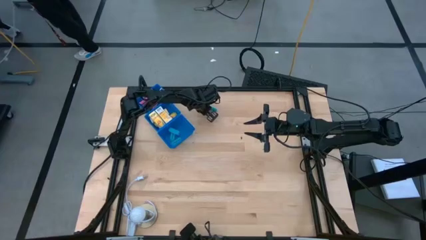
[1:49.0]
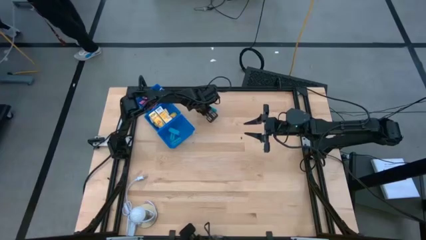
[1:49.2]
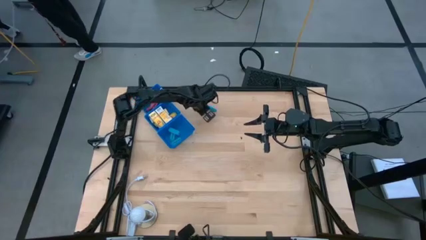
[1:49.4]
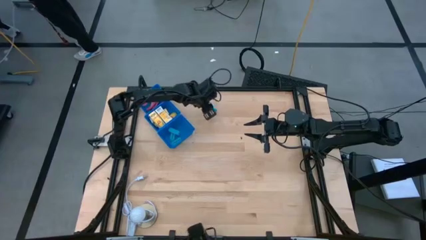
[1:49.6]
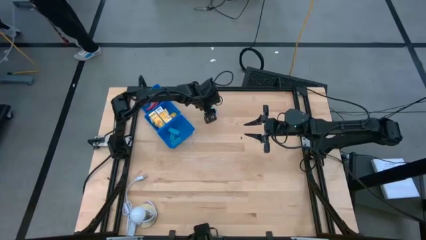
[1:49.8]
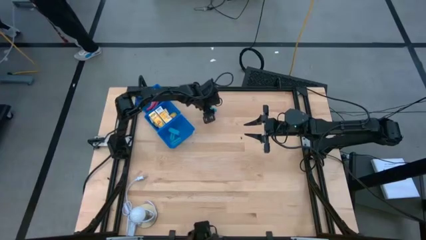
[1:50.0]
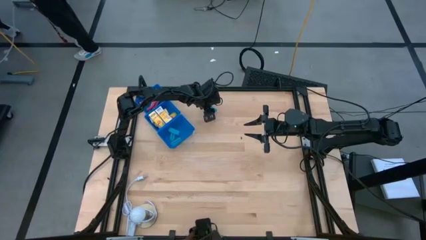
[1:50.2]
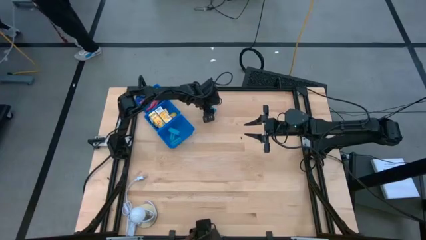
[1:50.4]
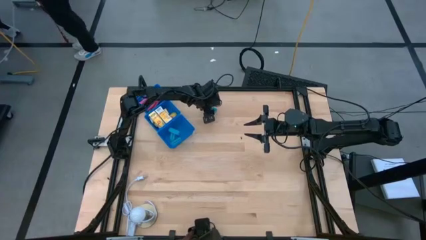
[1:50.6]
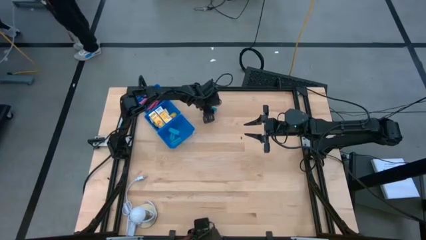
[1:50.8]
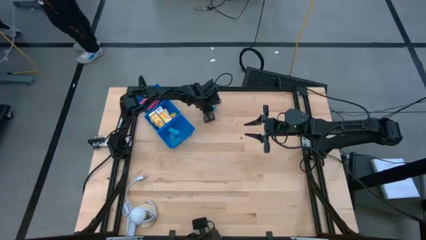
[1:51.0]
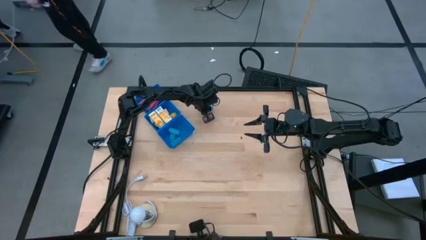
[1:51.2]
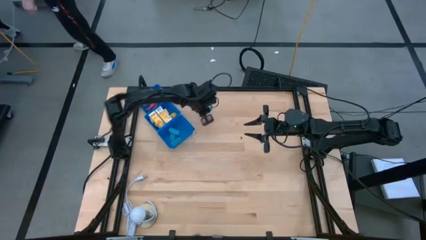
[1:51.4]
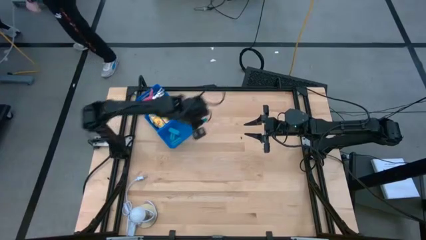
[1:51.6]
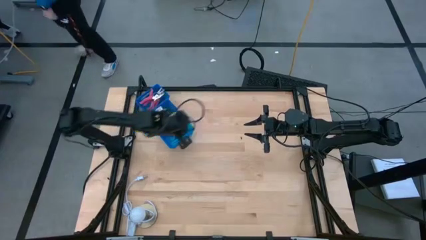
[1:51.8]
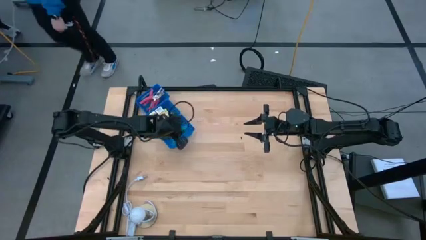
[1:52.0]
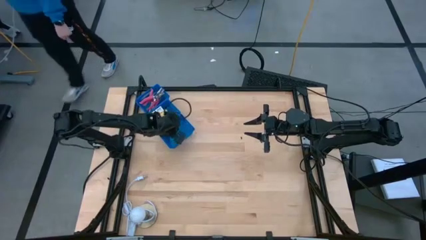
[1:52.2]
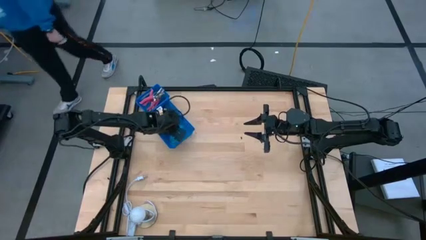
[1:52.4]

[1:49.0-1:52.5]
Task: Pick & Place School Supplies
Put the blue eraser into the bottom blue bin

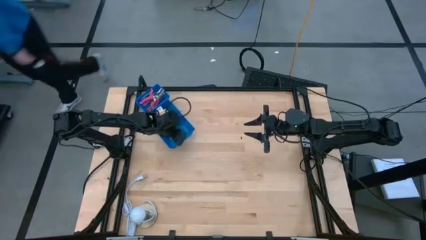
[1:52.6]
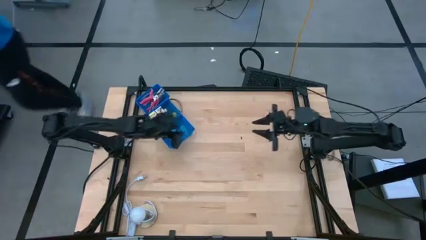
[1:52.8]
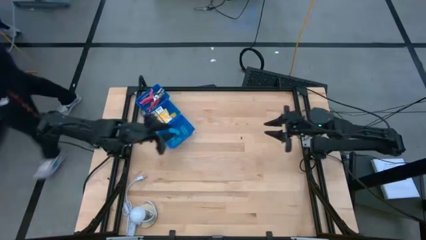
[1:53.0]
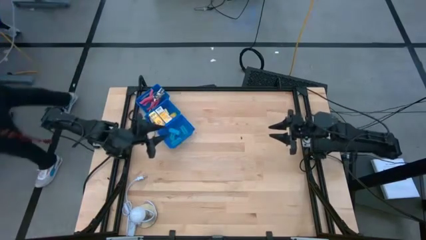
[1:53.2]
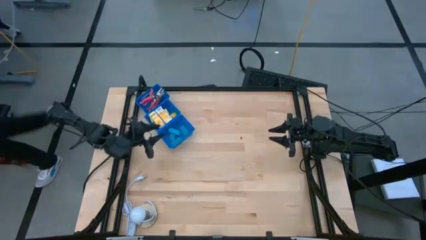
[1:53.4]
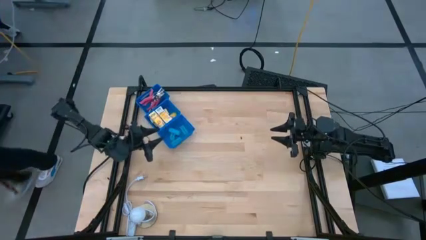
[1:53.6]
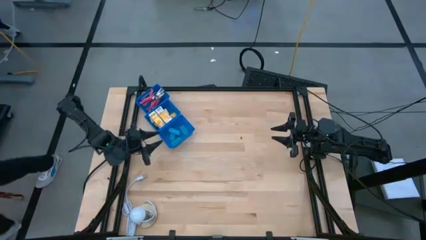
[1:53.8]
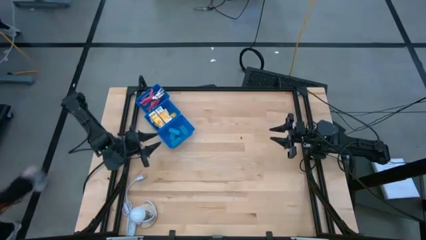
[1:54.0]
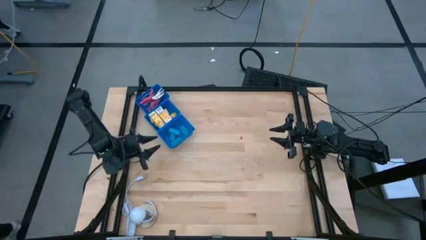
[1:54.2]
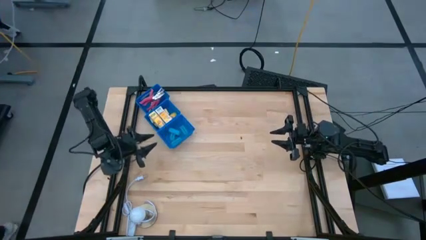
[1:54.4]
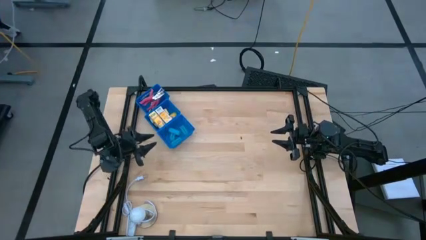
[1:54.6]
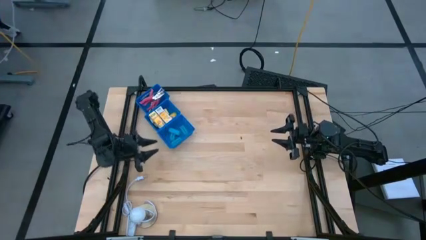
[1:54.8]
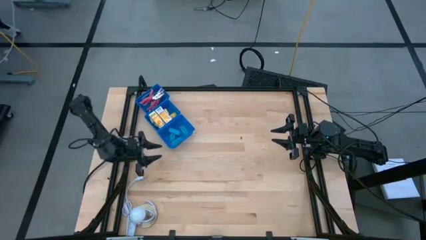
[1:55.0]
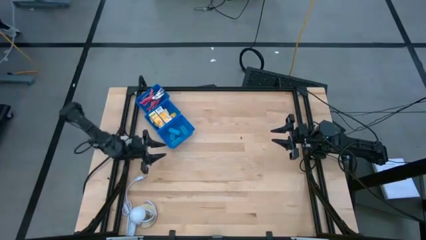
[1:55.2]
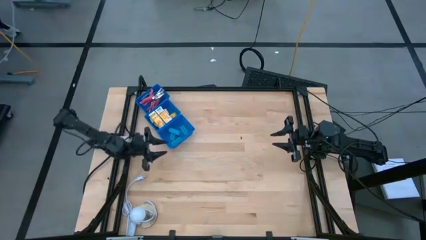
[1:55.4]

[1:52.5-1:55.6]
Return to Home Position

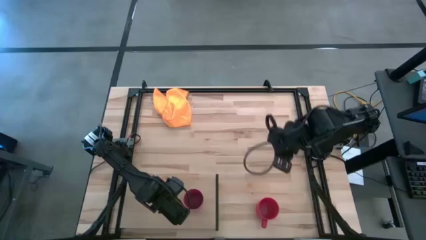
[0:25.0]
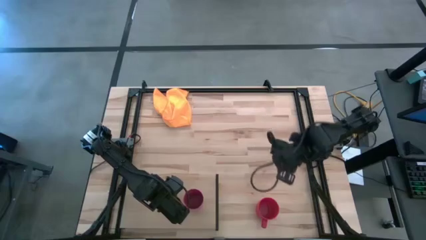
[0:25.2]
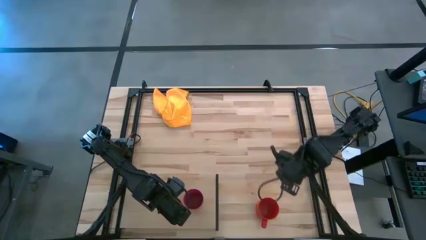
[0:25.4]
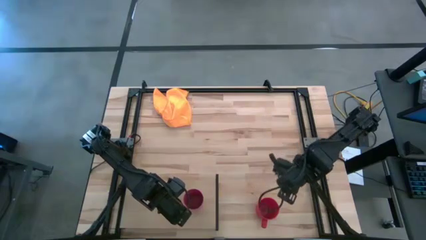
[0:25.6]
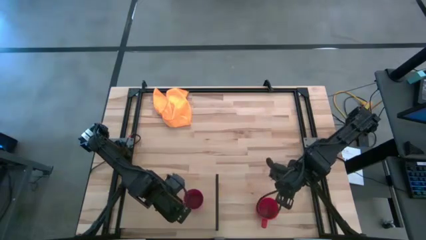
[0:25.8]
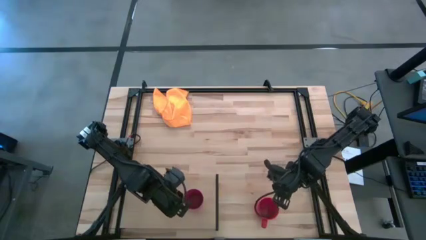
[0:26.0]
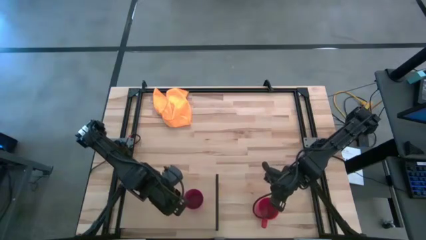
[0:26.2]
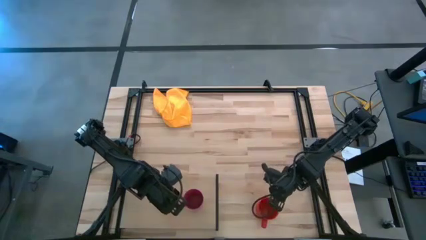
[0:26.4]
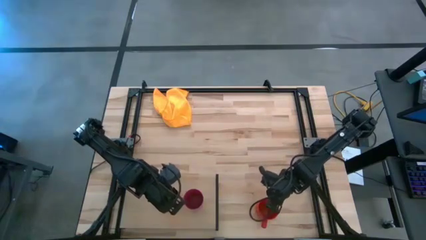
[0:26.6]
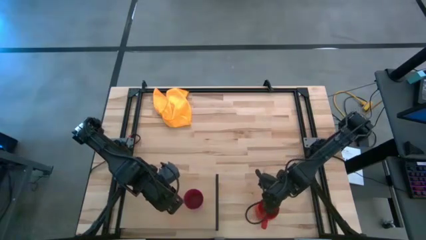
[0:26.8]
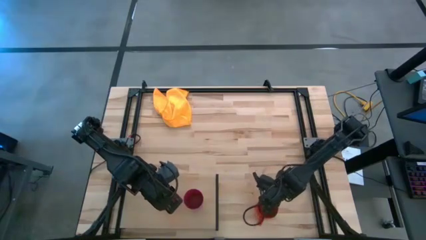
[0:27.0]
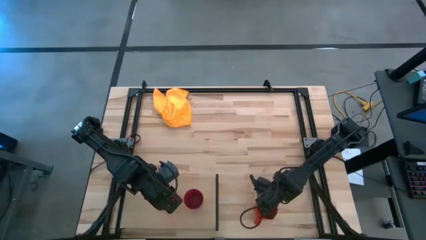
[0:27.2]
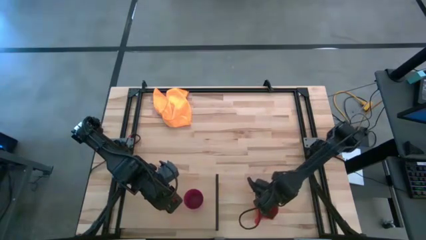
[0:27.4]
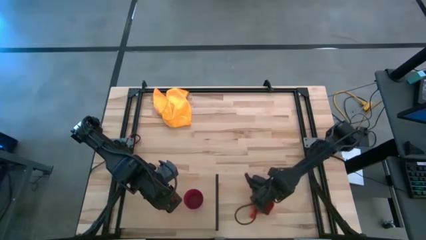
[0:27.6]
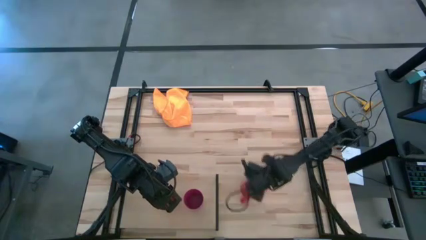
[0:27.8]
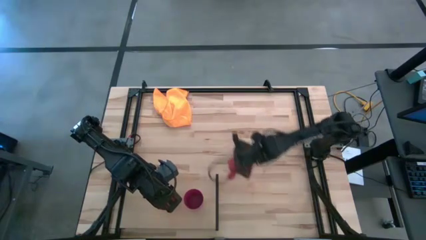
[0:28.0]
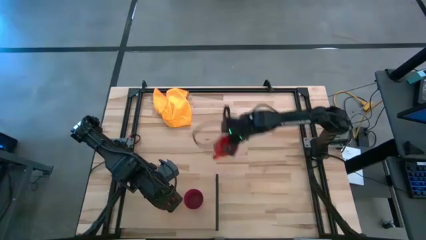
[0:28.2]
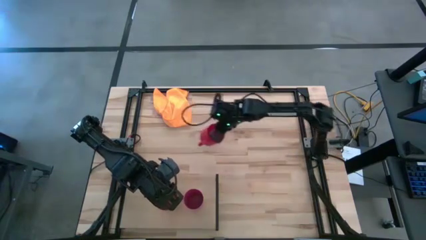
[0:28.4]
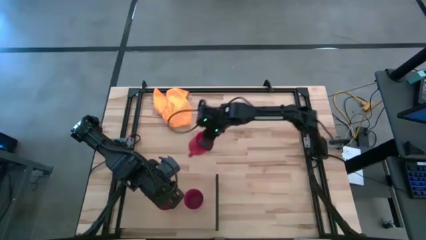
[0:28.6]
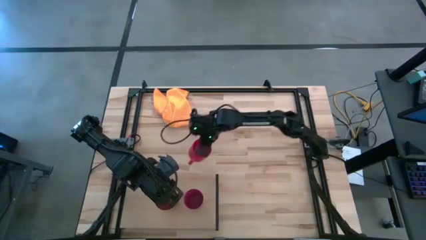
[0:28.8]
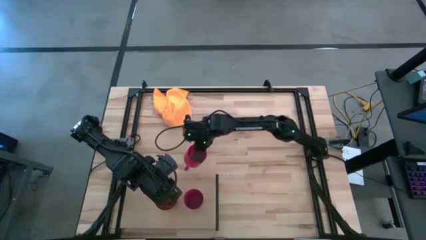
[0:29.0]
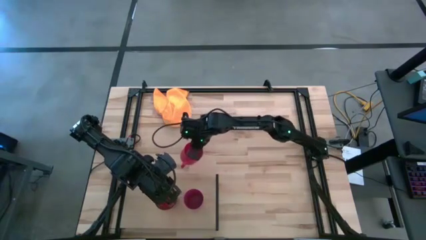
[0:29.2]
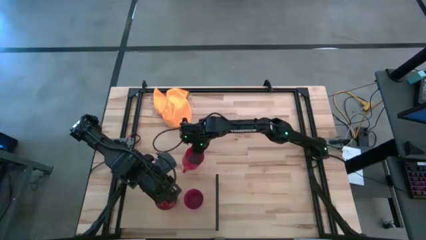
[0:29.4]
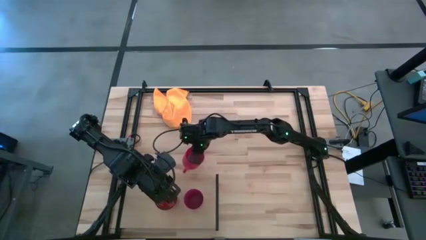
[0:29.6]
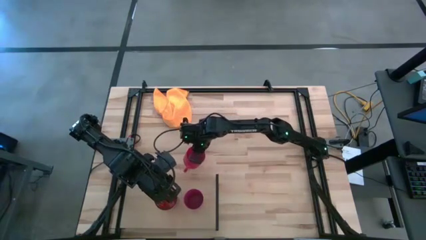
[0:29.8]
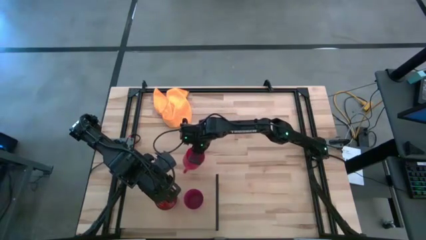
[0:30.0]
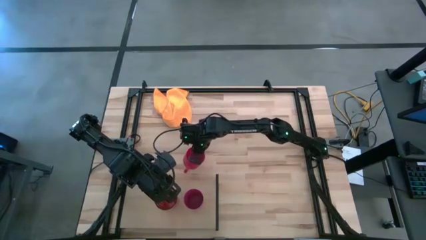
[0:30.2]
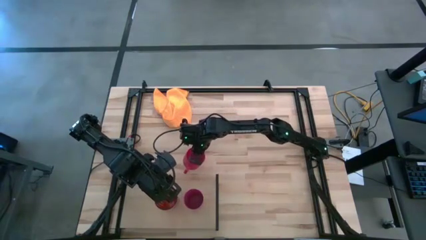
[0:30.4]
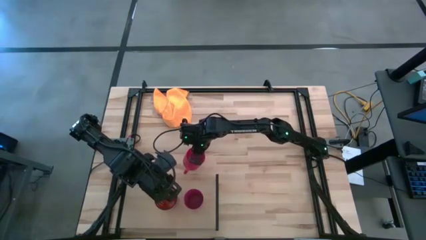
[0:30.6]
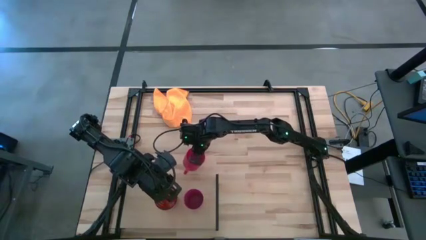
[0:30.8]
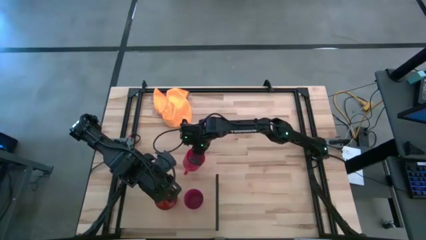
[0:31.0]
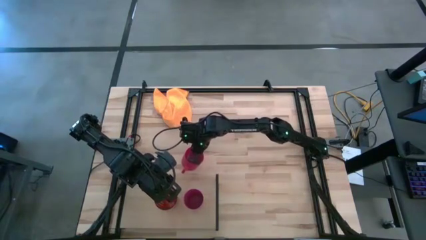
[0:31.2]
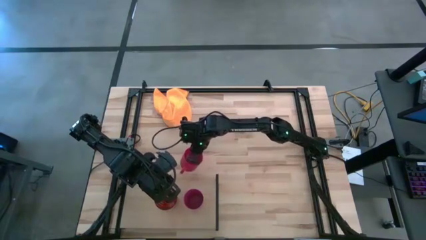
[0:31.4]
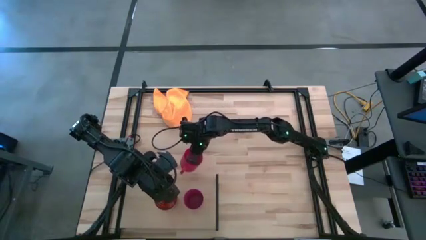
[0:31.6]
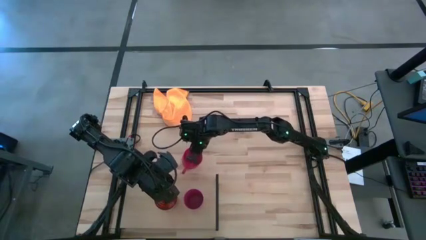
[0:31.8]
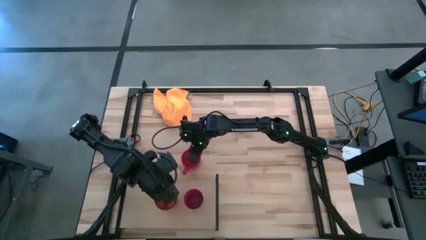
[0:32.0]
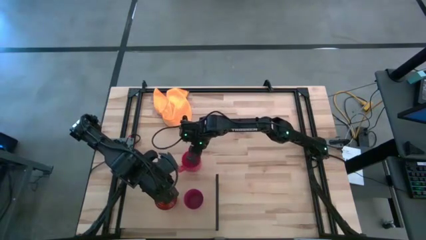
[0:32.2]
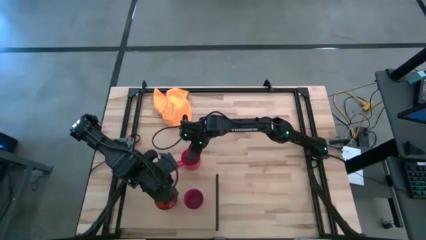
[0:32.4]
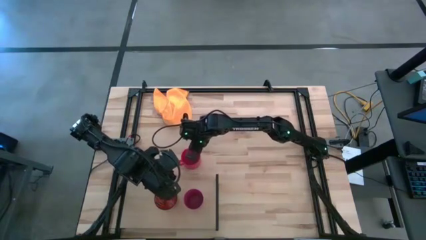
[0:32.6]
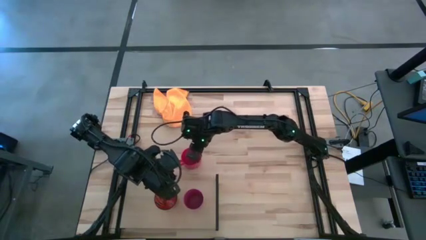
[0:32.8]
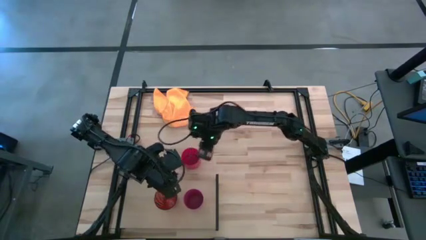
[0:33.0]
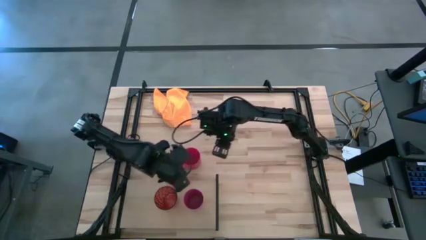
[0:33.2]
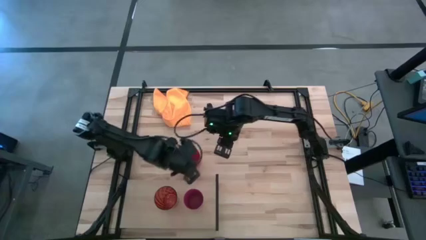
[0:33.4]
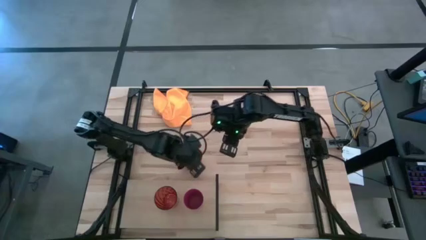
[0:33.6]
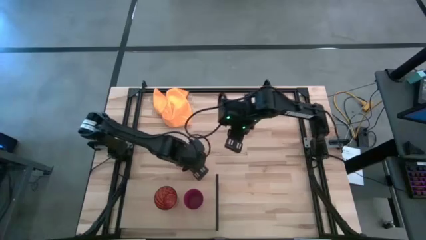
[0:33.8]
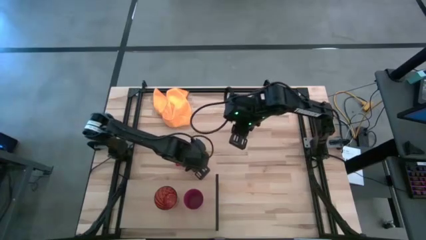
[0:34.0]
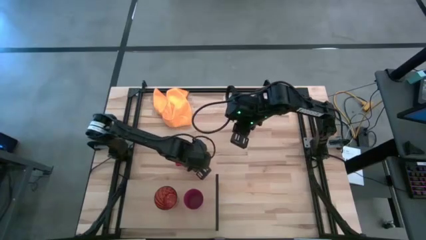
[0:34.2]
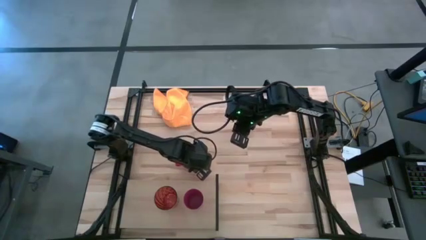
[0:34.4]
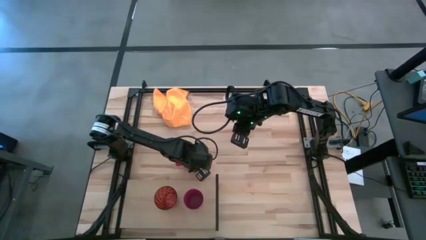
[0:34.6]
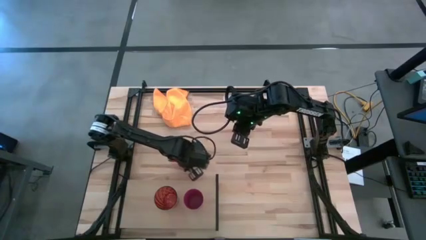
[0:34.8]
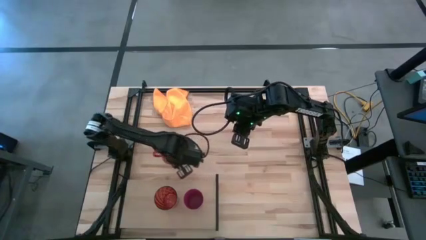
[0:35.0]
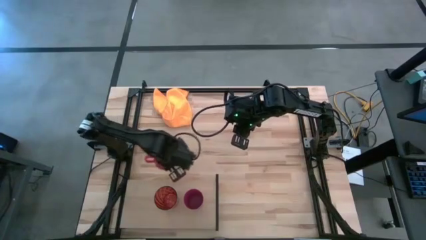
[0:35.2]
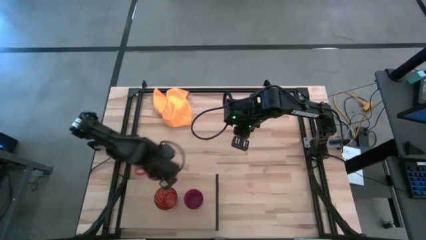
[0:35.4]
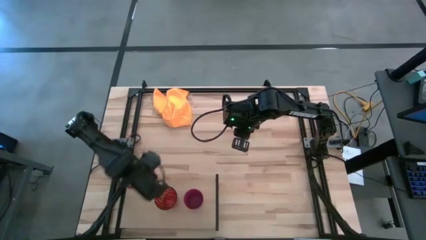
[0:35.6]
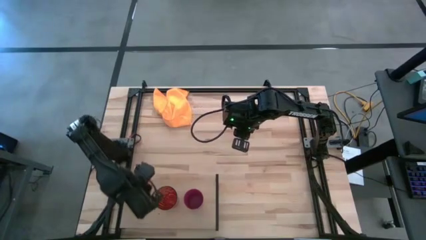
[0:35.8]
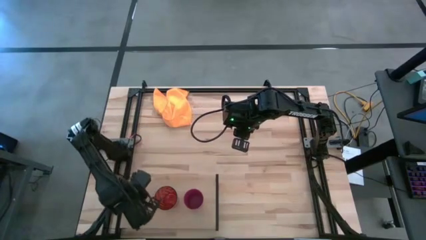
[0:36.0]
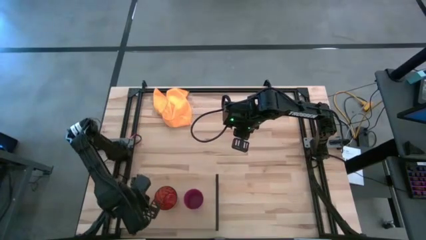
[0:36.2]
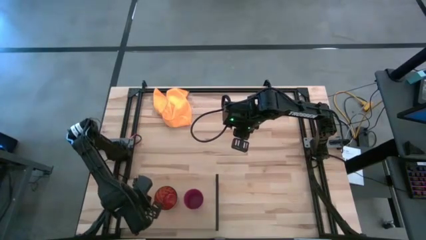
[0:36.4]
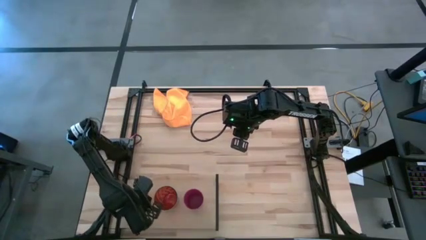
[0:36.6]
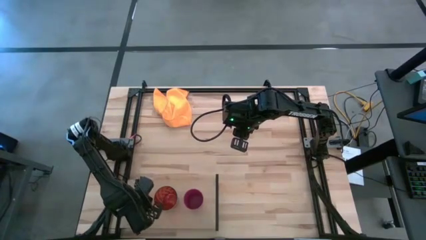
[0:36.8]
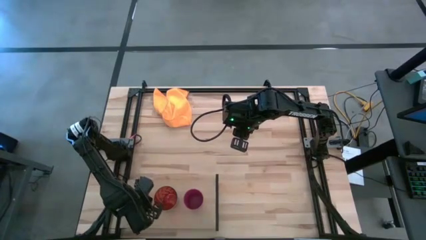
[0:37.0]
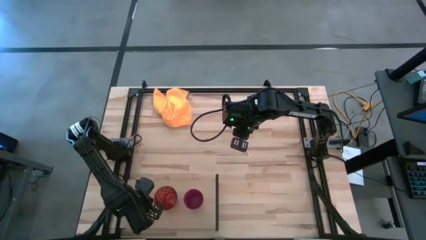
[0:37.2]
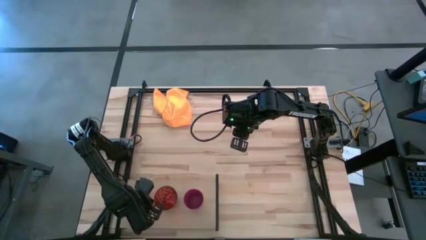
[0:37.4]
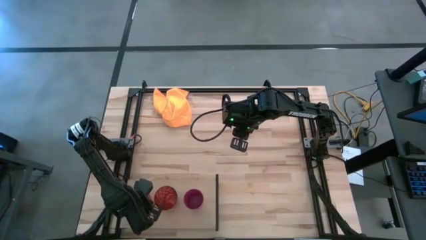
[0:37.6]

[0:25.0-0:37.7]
Task: Stack small to large cups/mugs on shelf
Put the red mug on the shelf
